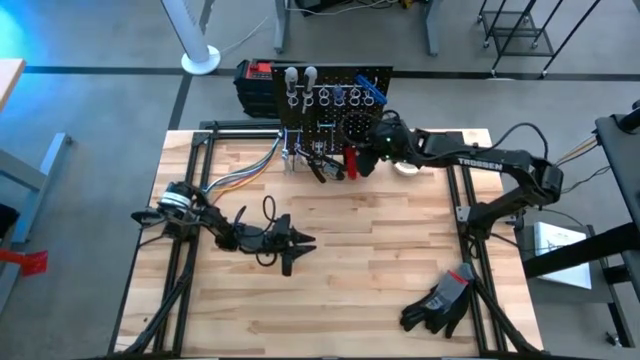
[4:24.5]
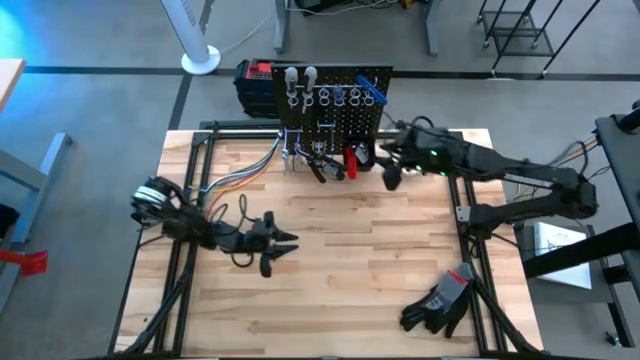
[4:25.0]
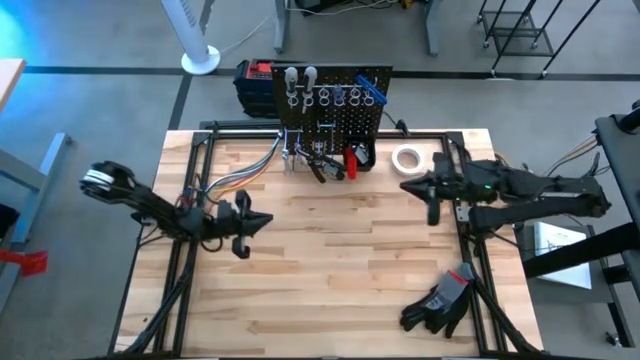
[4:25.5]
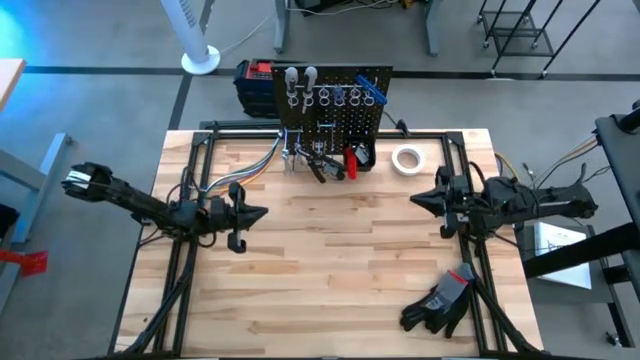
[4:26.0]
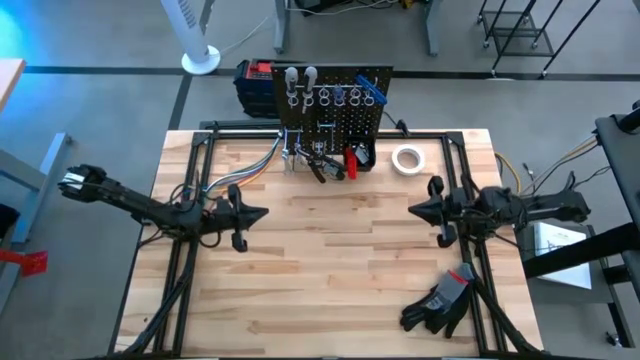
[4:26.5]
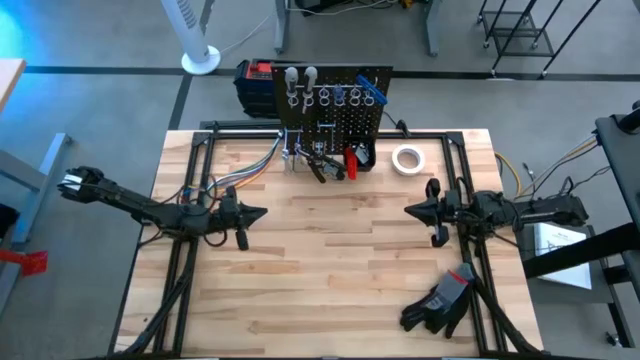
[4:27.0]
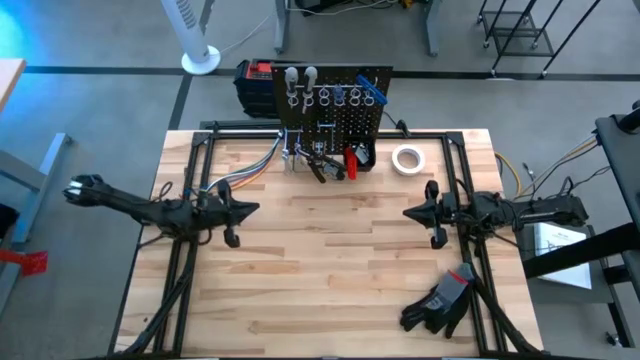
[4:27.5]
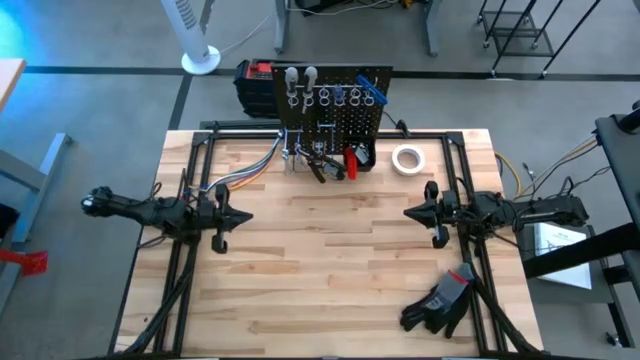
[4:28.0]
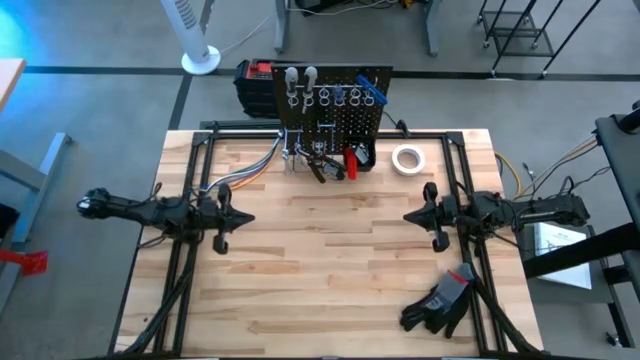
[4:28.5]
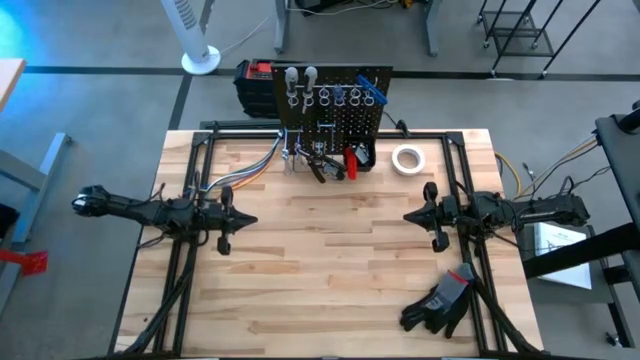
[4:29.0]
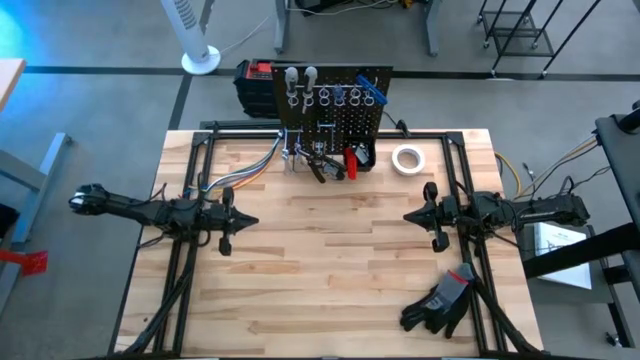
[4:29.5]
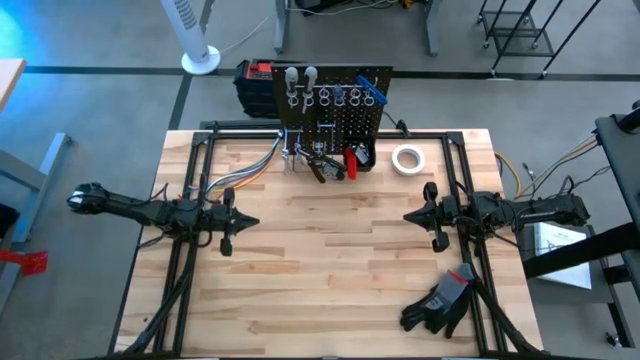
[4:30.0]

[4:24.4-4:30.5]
Task: Hang tools onto peg board
Return to Home Position

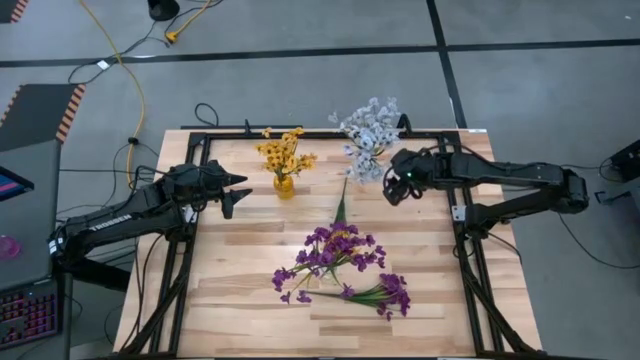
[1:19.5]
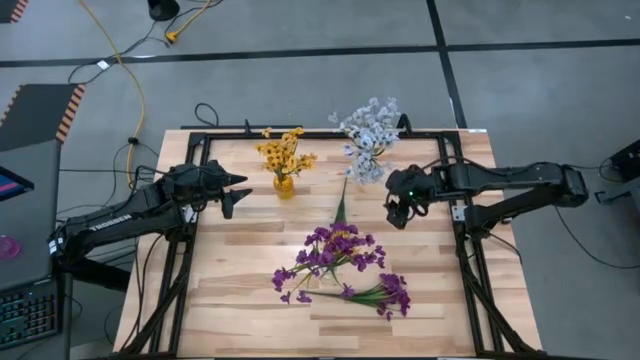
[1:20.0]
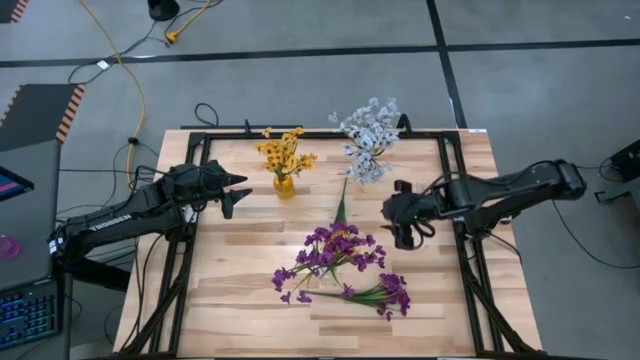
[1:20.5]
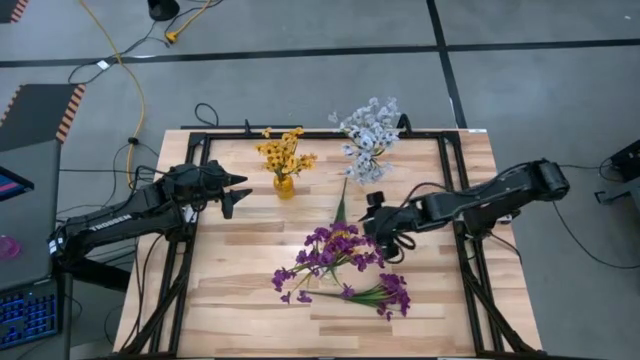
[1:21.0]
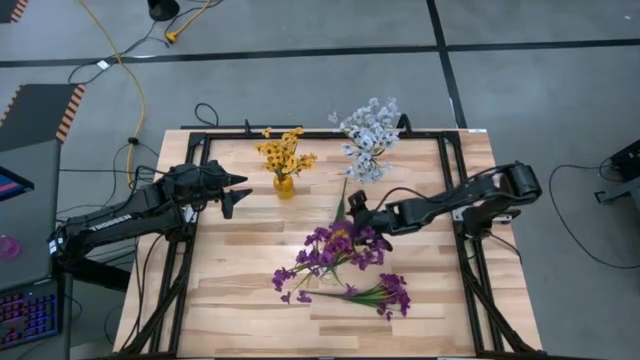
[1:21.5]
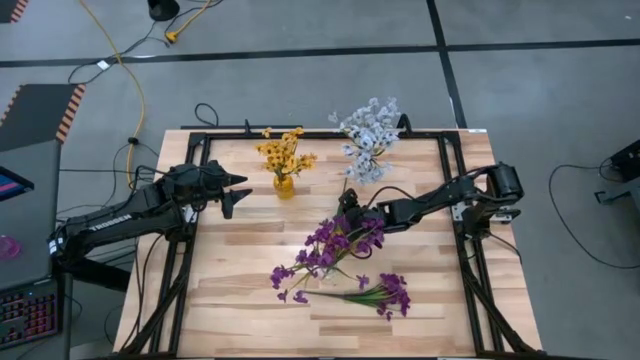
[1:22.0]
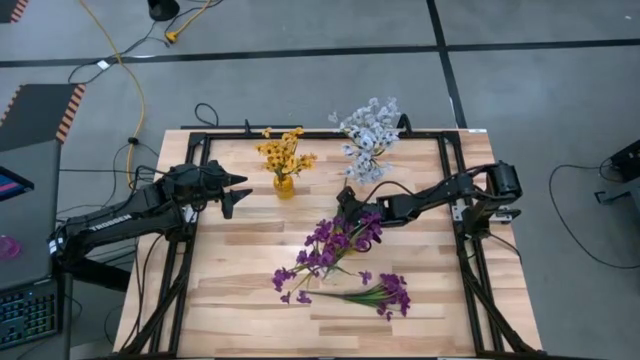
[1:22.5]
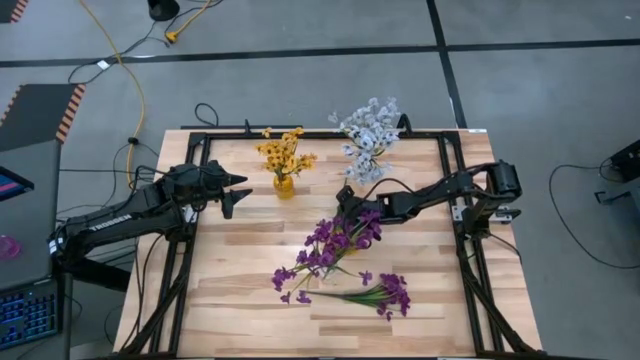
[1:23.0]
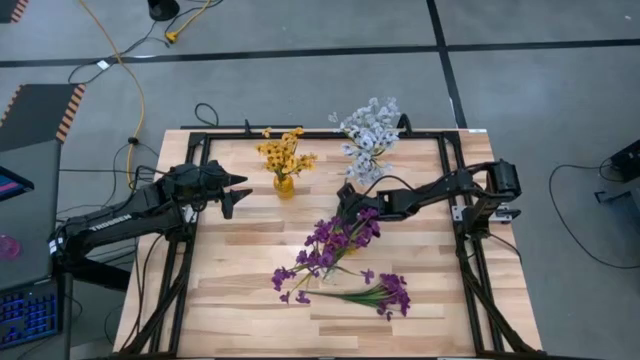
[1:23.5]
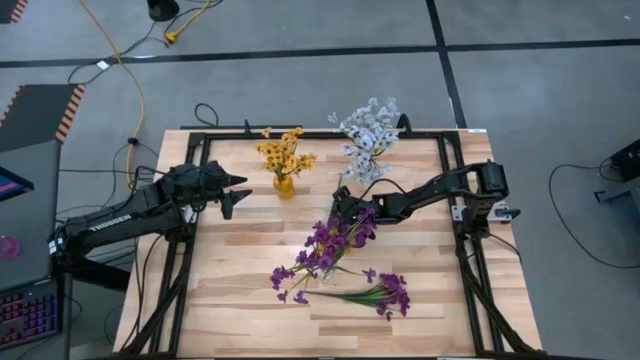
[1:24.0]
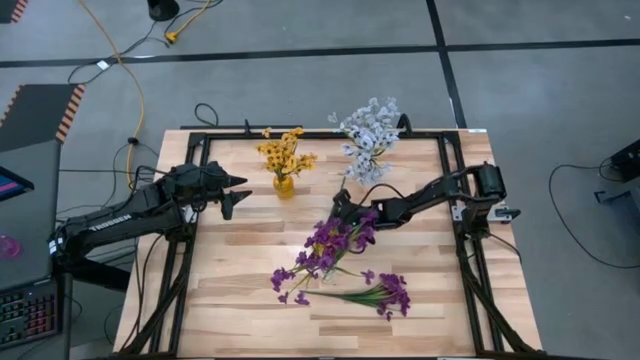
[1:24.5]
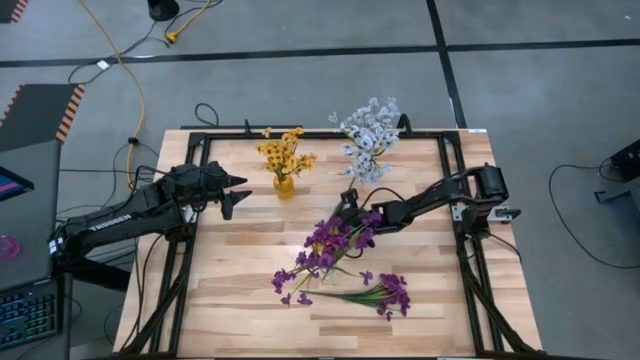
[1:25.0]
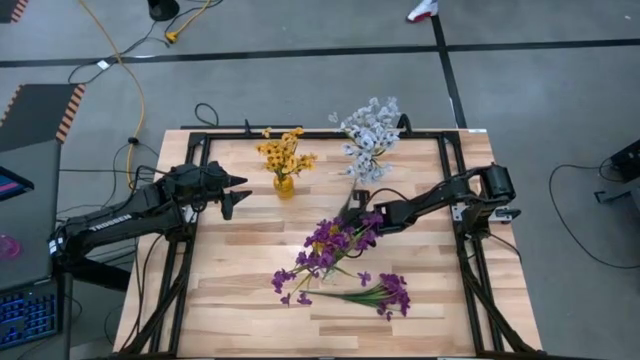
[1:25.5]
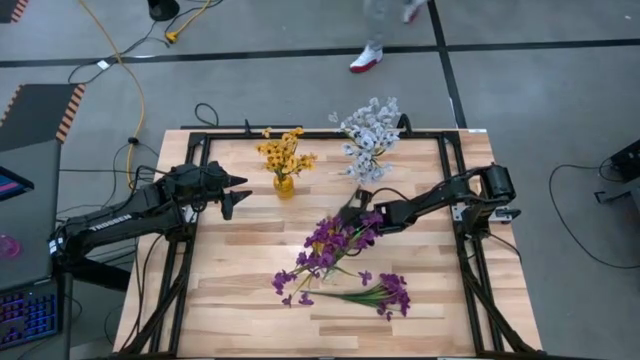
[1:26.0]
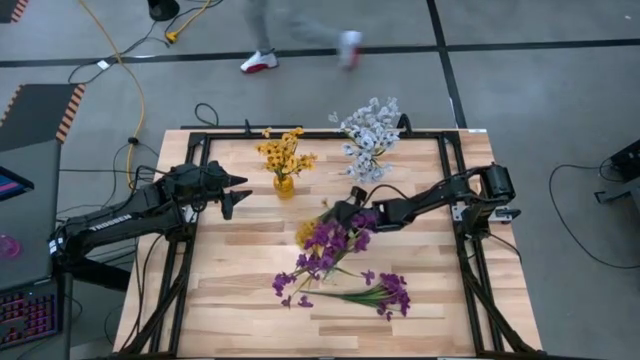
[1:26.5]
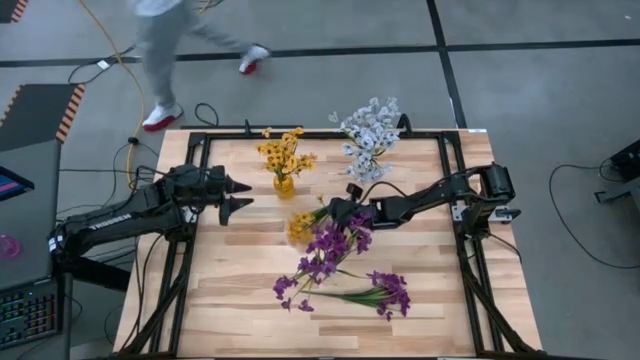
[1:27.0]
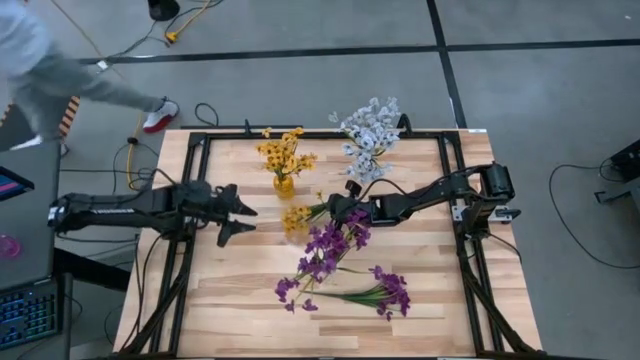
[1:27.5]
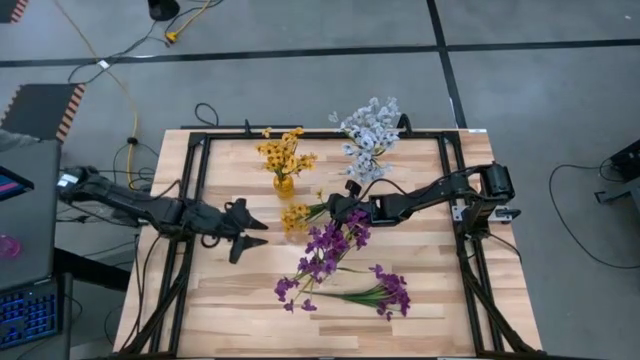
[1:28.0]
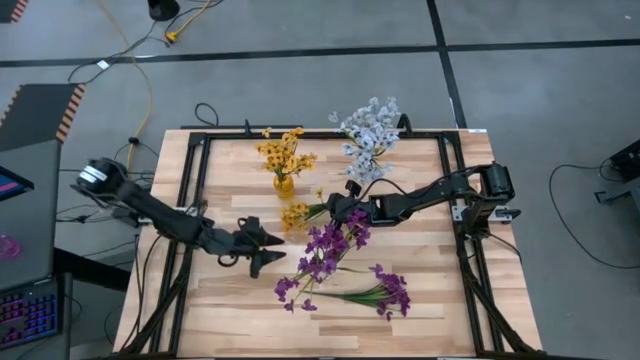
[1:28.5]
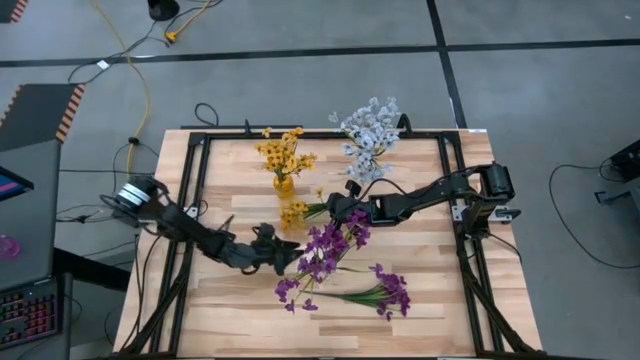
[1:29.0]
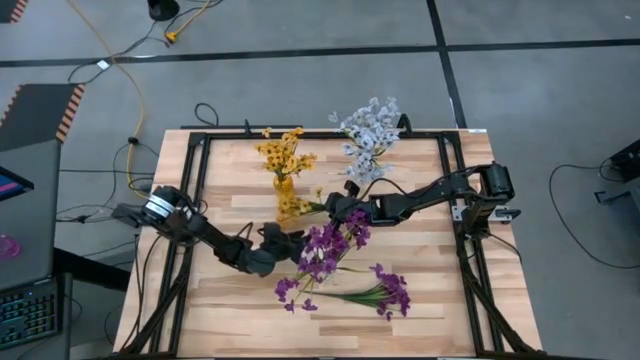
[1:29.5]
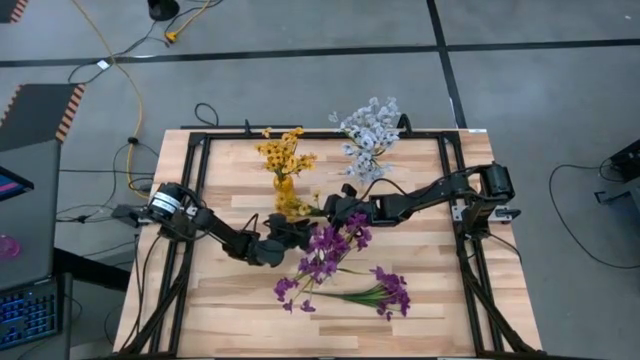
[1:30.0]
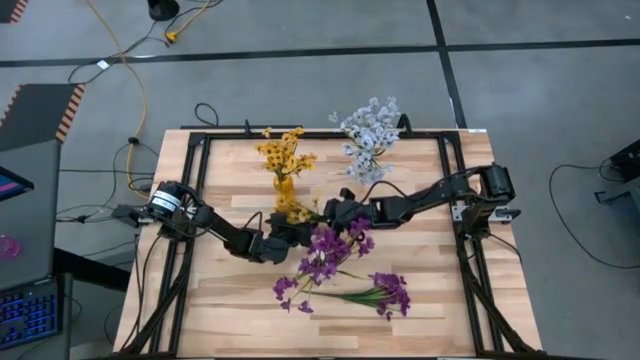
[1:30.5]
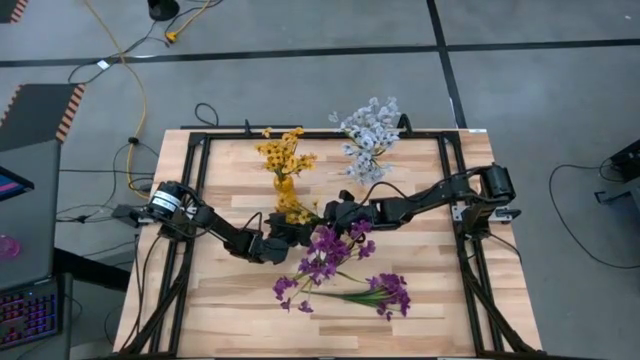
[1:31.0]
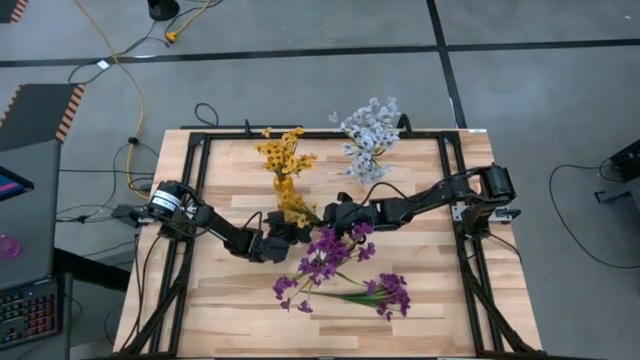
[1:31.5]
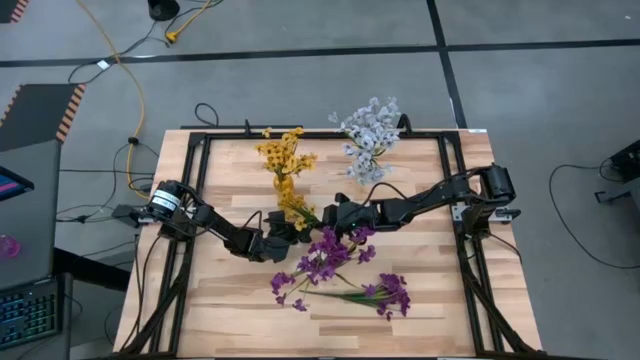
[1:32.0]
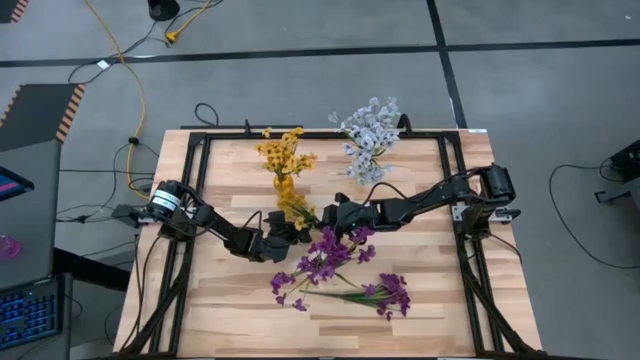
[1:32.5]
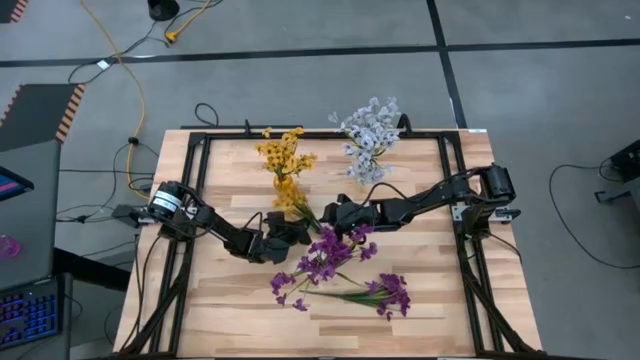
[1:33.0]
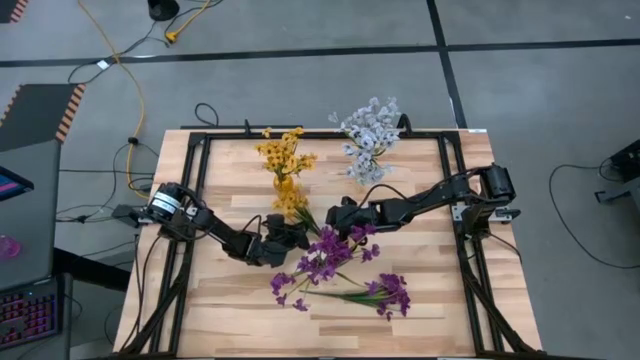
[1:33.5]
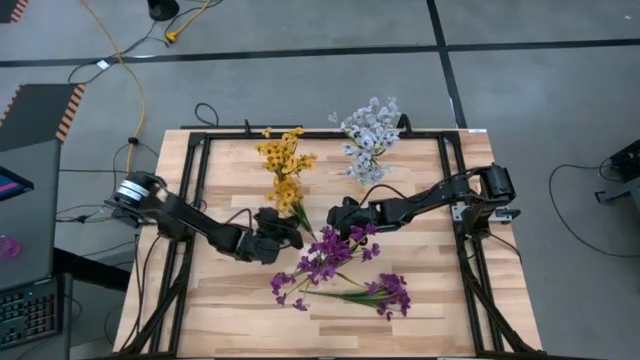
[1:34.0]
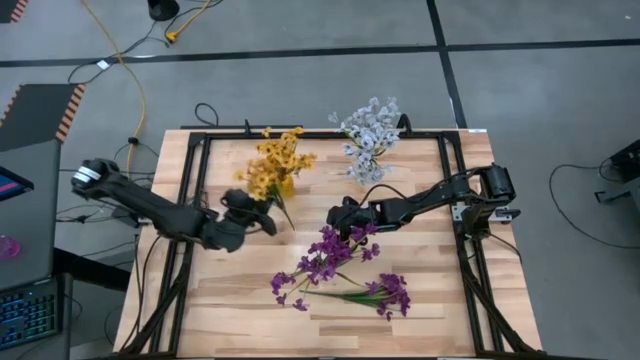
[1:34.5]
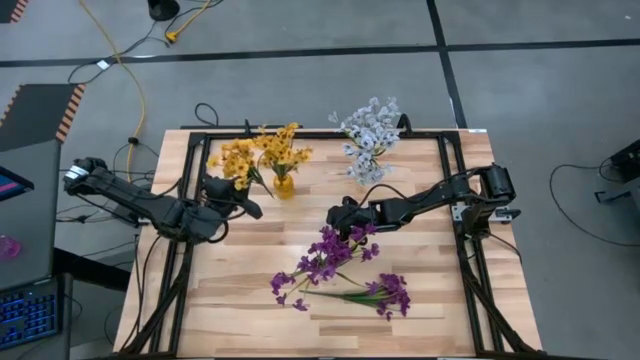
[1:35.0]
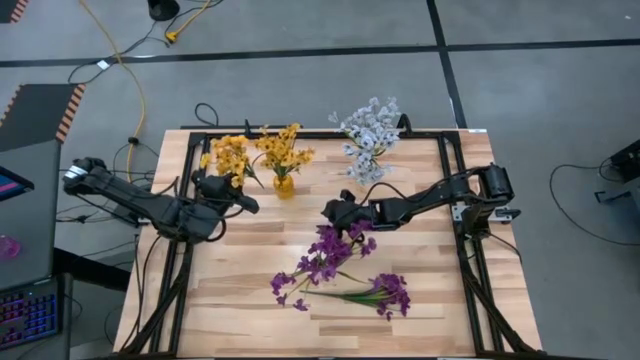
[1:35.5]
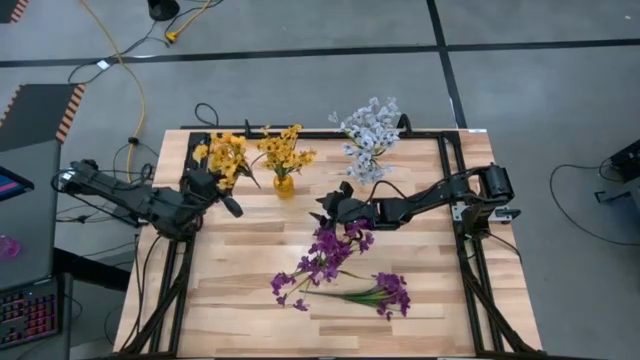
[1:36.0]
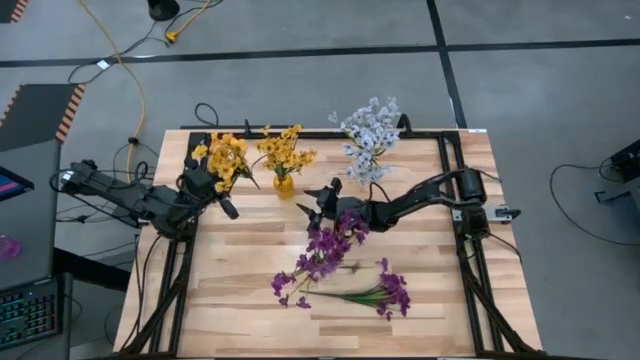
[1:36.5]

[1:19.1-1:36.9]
Task: Sort flowers into vase by color
Put the yellow flowers into the yellow vase
